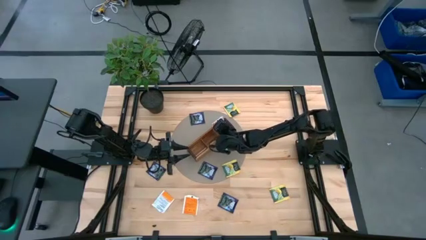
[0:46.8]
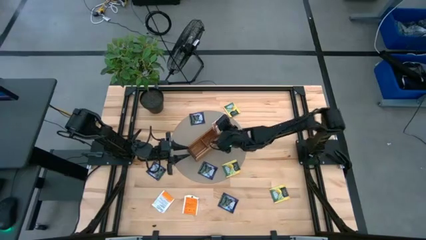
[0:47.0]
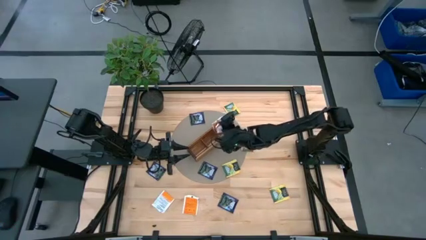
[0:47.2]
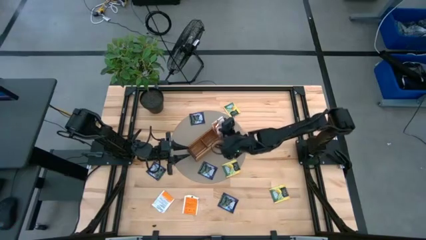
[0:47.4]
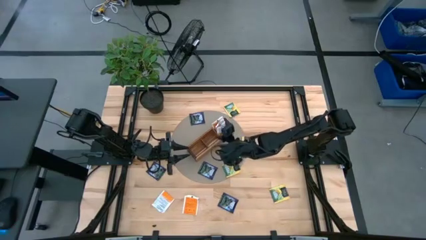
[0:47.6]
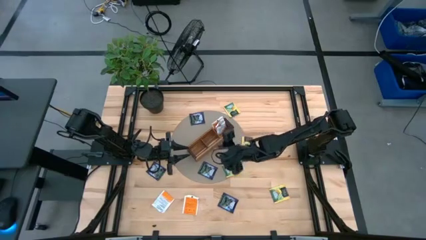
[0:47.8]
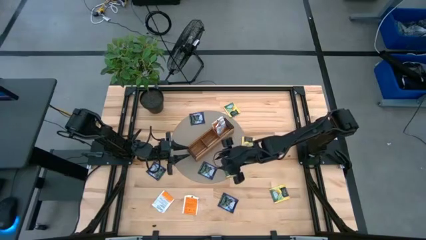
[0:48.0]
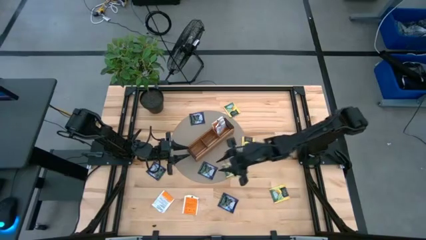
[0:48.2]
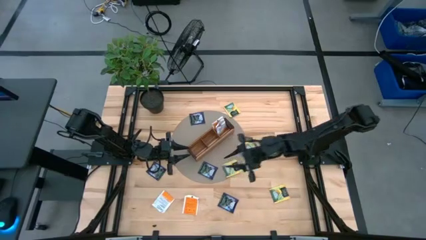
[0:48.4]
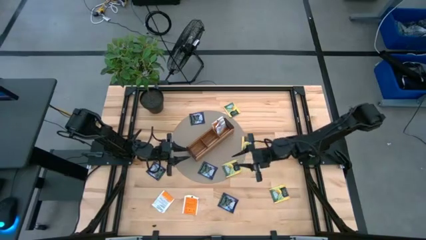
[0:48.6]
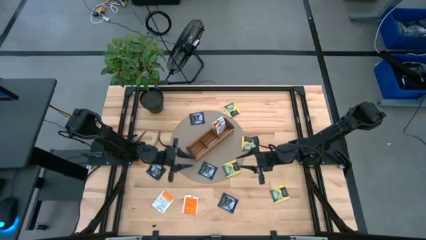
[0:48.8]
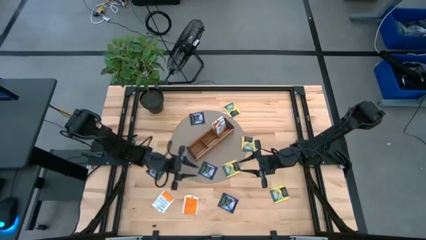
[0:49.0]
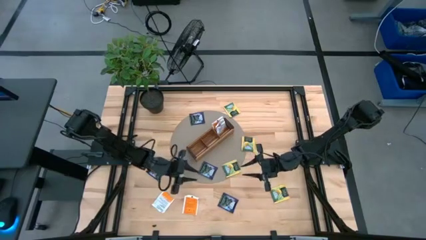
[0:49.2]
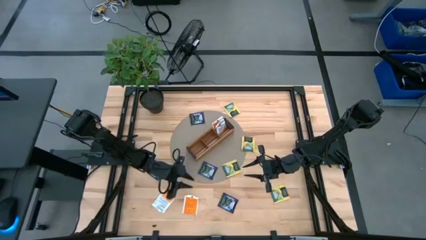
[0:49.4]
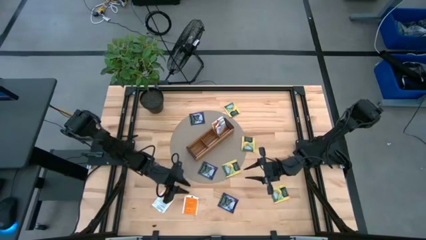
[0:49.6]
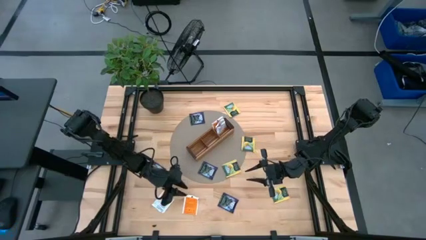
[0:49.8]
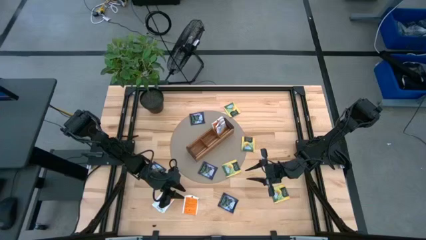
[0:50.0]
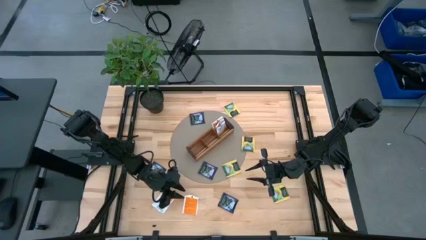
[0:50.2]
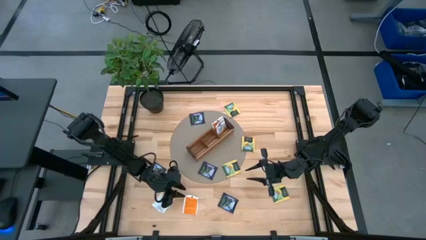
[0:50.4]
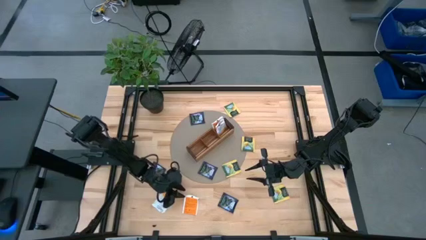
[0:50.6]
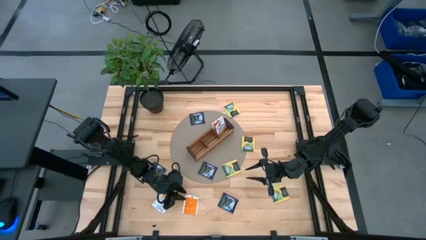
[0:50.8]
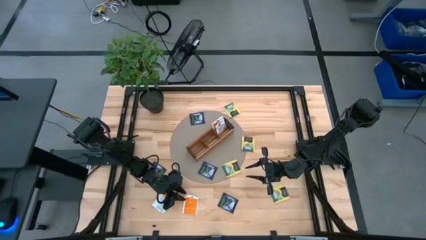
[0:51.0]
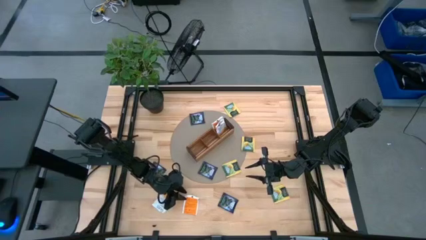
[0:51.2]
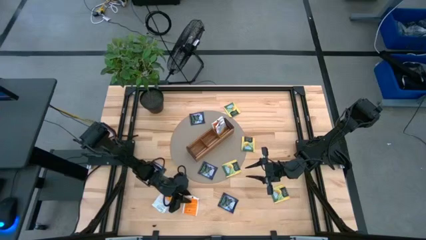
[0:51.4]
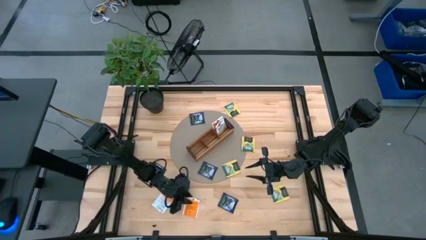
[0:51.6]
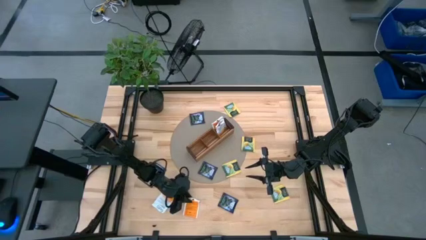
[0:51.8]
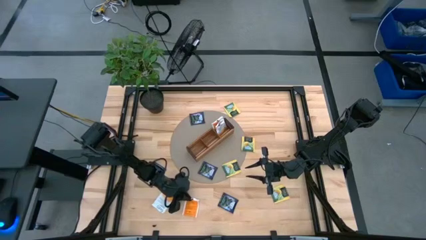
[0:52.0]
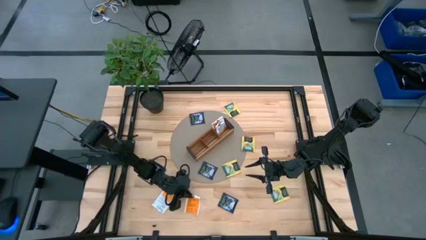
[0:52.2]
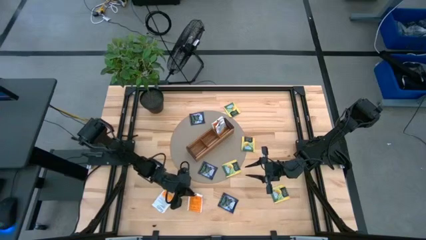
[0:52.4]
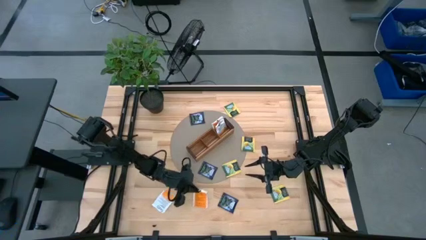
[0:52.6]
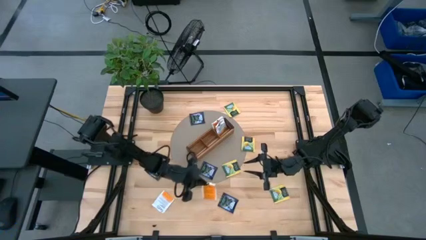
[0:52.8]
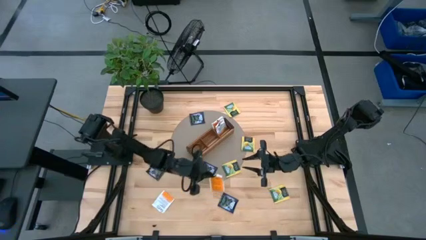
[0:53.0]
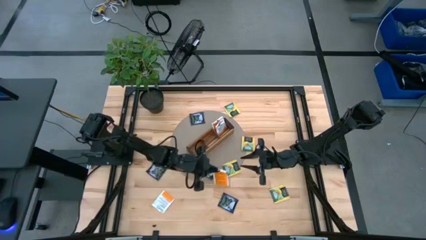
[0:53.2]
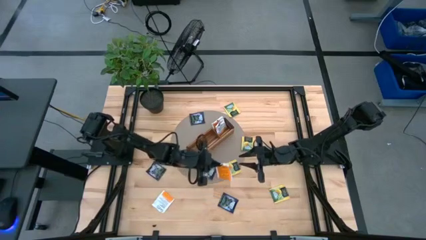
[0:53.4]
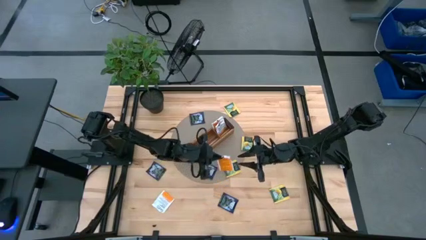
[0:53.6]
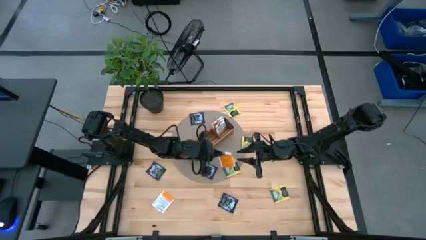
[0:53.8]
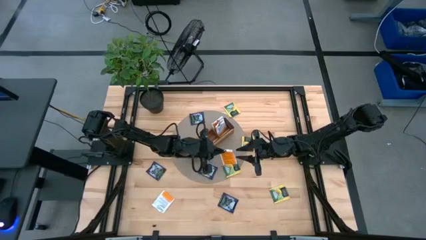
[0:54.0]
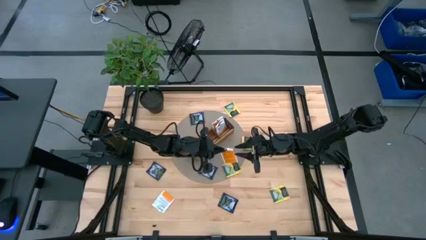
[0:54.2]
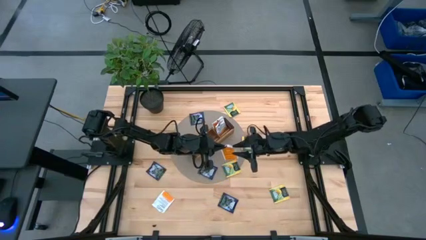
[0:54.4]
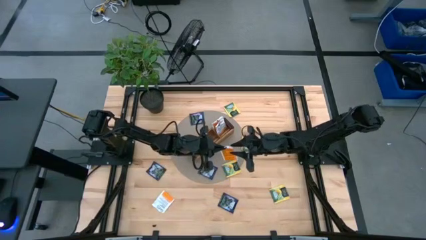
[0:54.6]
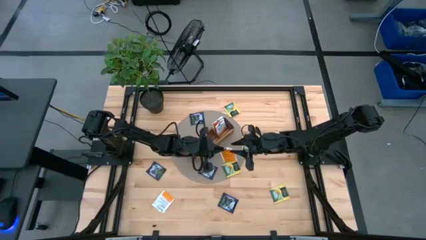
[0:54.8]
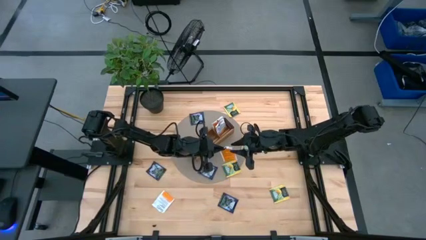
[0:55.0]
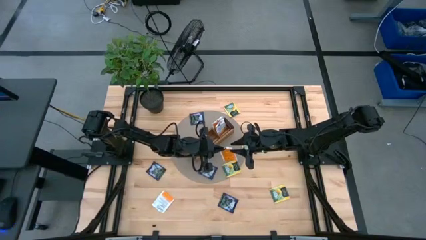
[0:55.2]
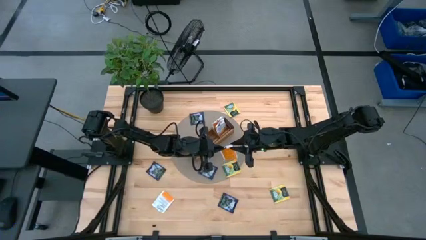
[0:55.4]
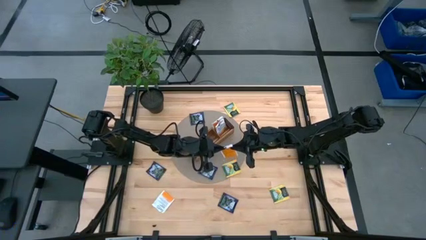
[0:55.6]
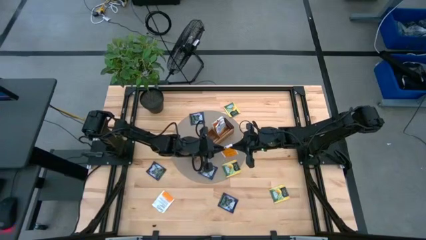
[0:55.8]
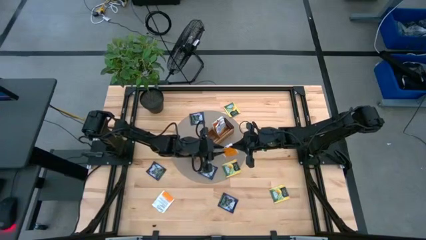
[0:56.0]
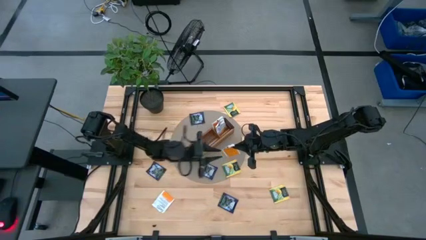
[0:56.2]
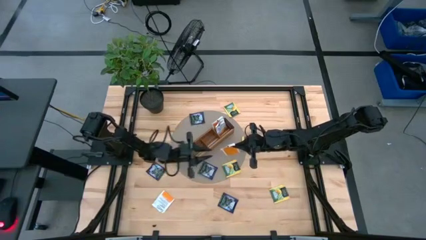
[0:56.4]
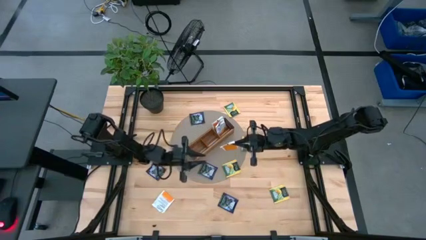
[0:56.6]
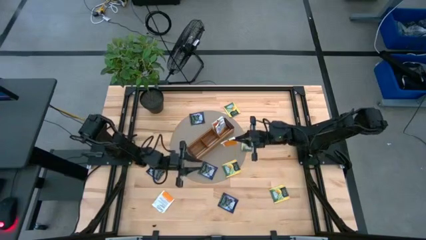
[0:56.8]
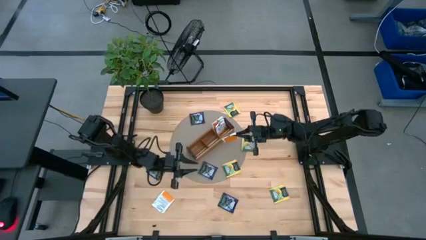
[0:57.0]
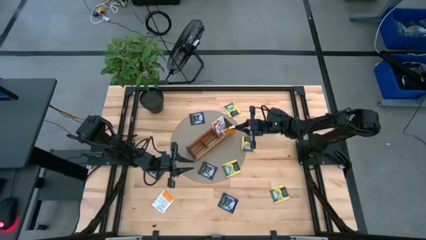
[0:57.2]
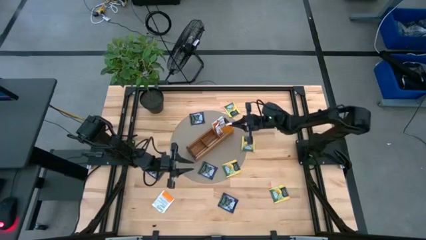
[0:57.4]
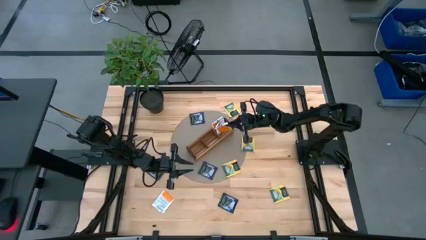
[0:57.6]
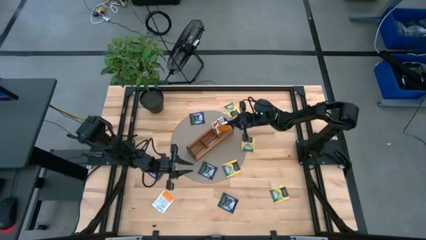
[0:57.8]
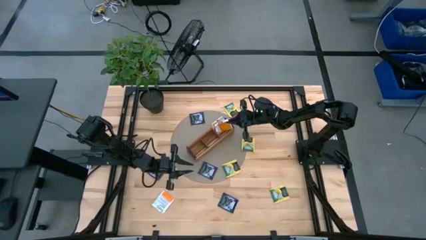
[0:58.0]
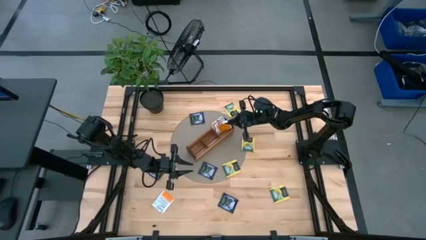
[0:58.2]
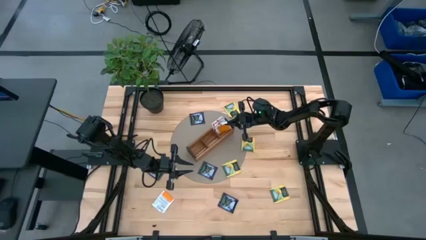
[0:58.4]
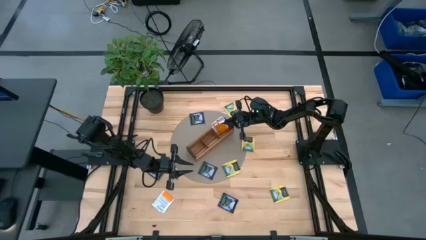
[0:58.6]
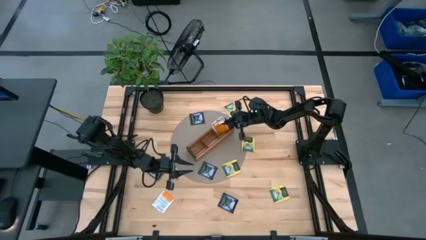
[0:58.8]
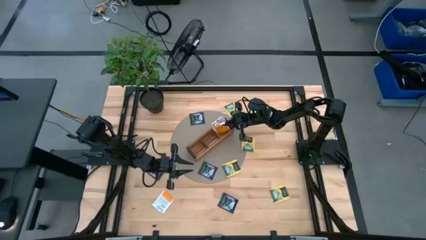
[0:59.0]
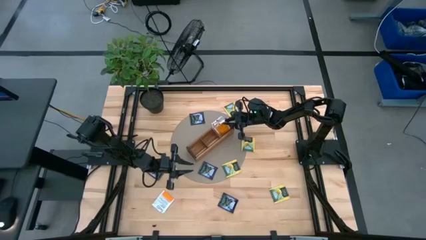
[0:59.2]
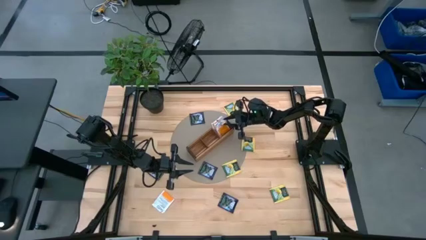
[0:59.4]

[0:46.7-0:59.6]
Task: Pick & Place Tea
Put the orange tea bag into the right section of the wooden organizer
